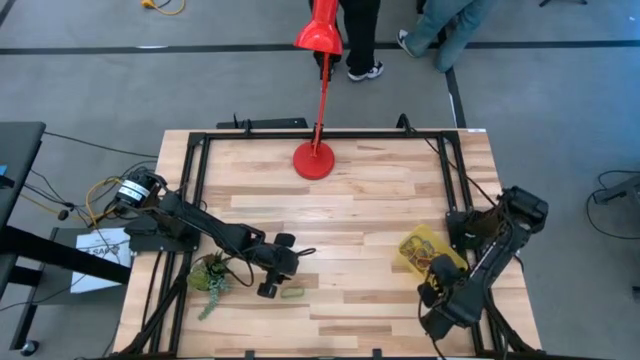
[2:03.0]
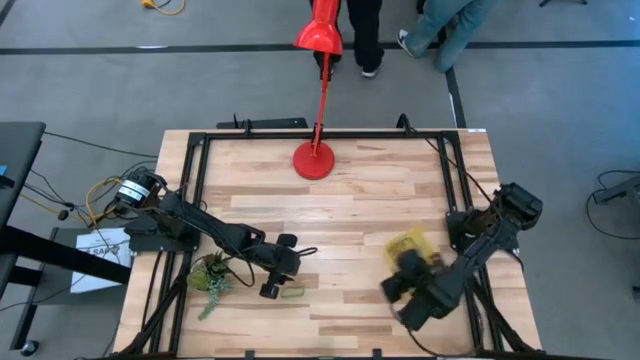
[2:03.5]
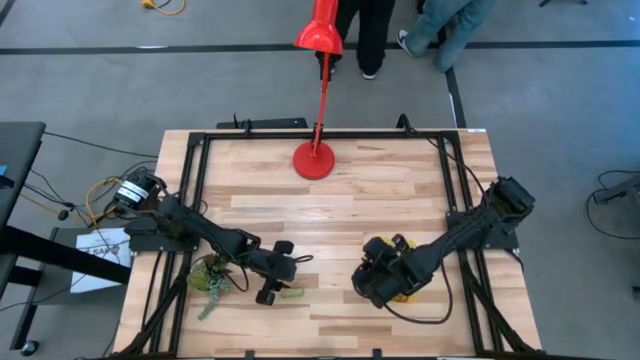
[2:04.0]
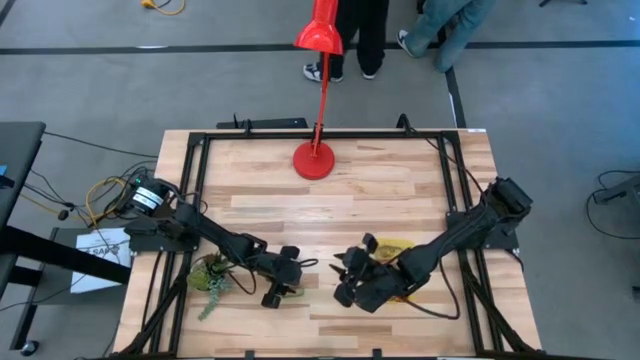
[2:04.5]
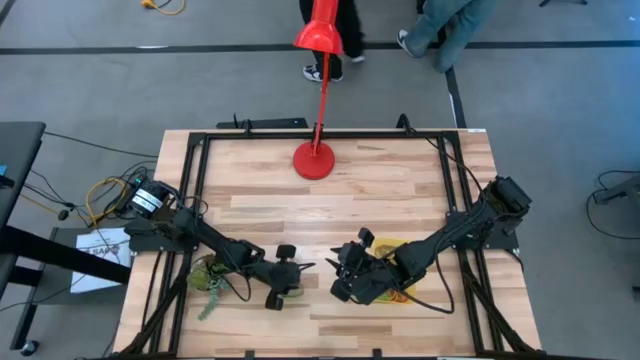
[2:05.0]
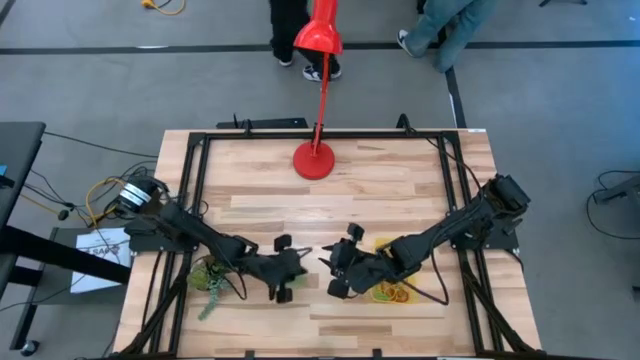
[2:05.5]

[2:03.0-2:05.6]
Task: Pick and place rubber bands into bin
Put the green rubber band into the container

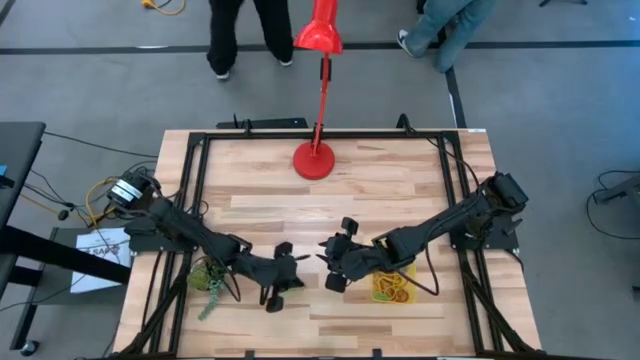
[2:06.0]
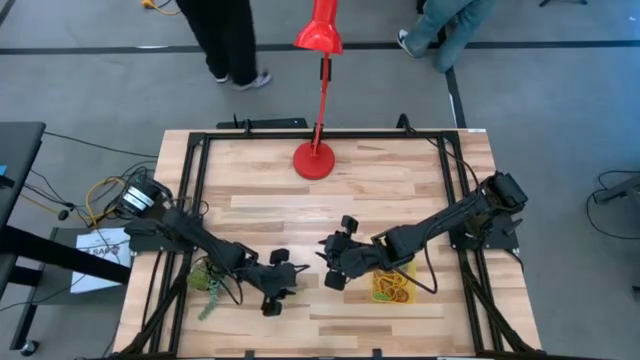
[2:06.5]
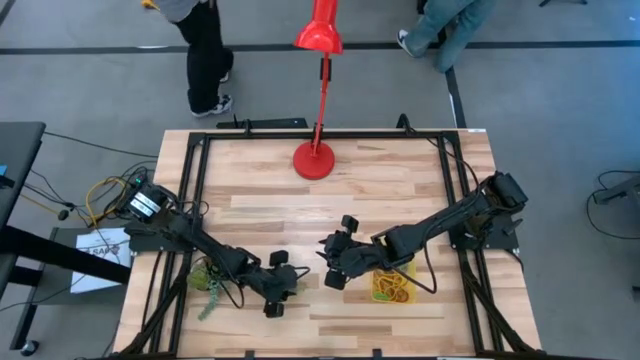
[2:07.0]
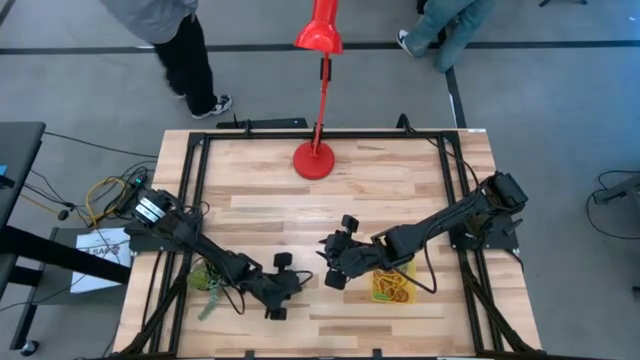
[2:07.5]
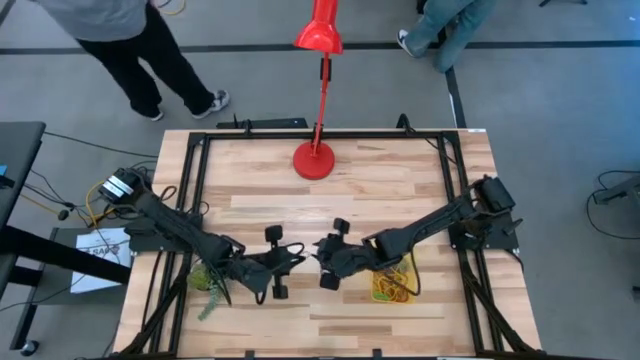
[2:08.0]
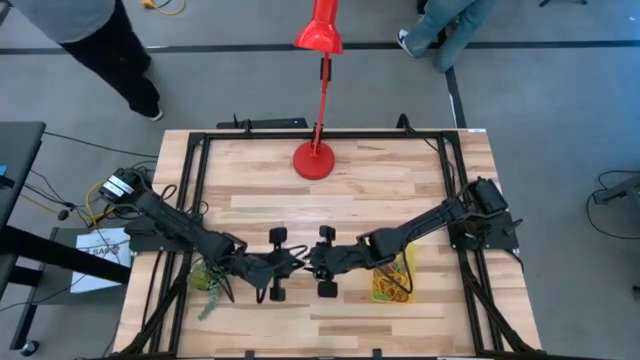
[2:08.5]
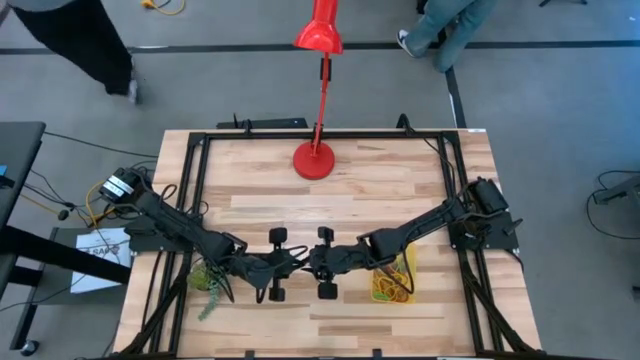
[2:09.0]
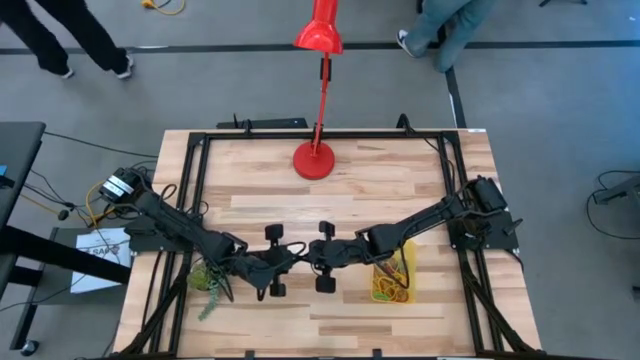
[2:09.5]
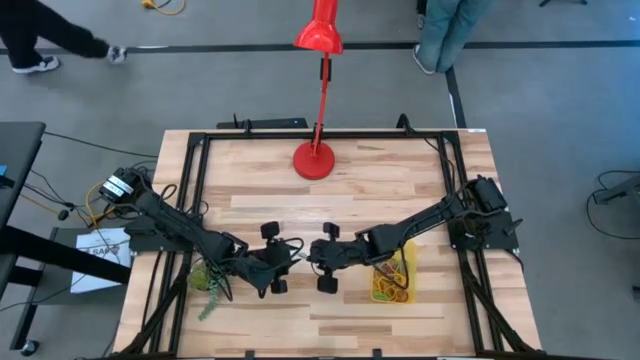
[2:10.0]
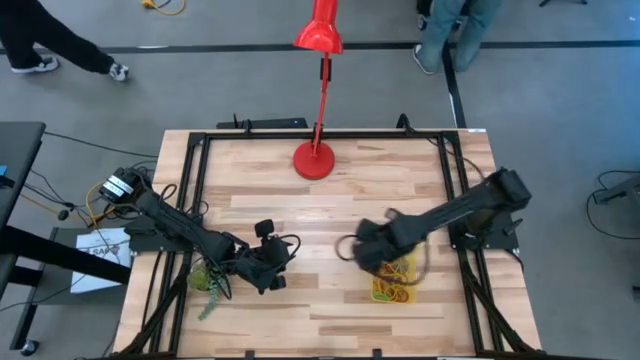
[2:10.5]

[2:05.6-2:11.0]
Put the green rubber band into the container

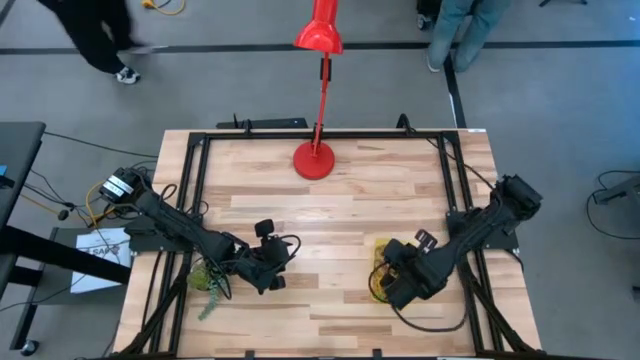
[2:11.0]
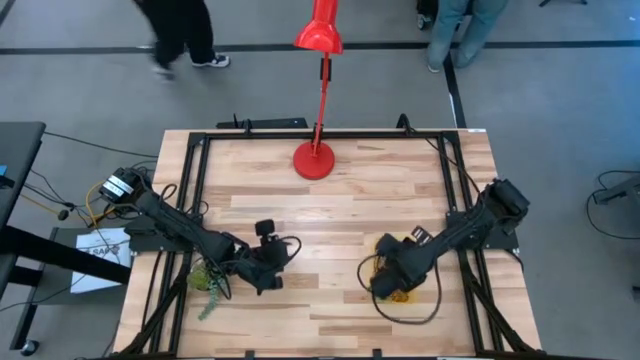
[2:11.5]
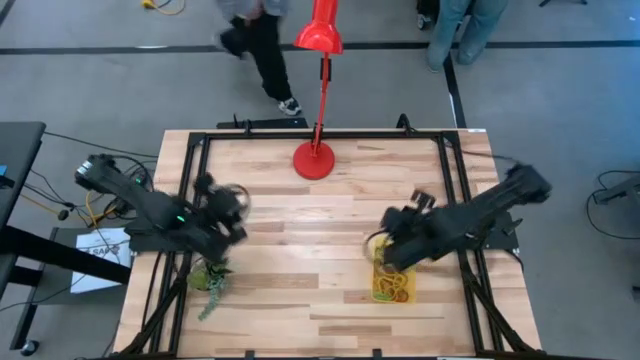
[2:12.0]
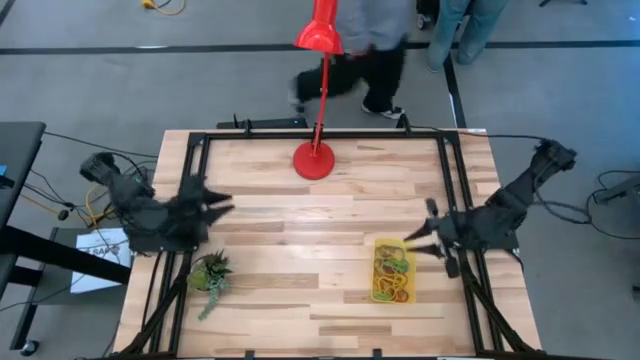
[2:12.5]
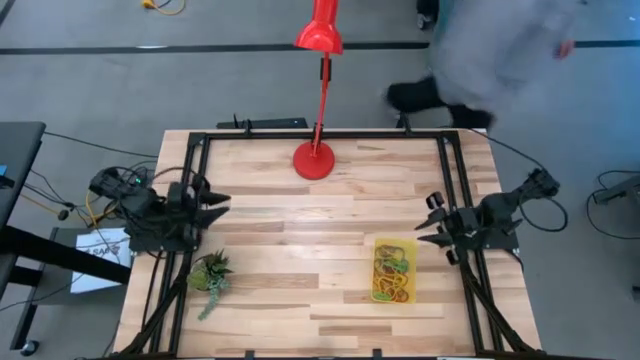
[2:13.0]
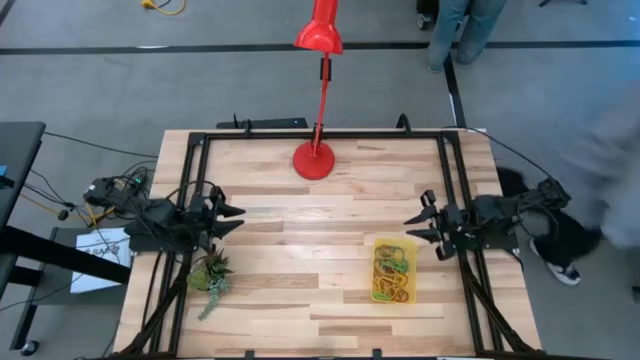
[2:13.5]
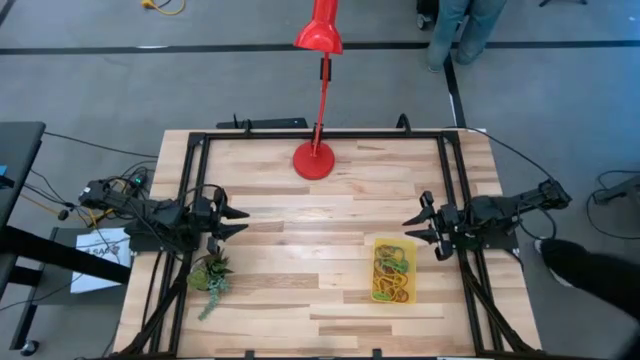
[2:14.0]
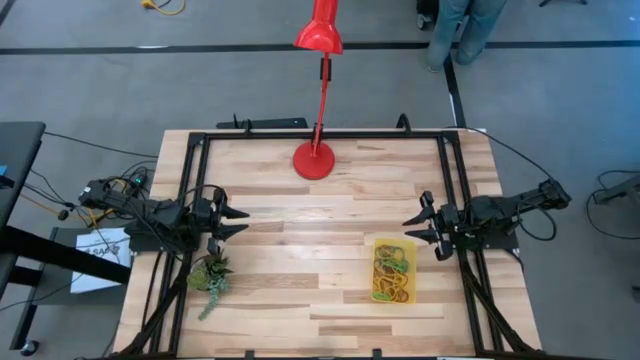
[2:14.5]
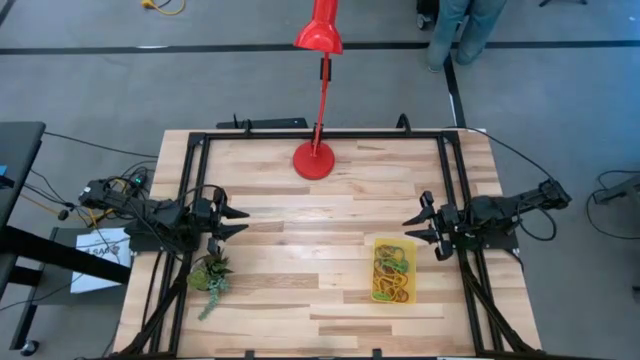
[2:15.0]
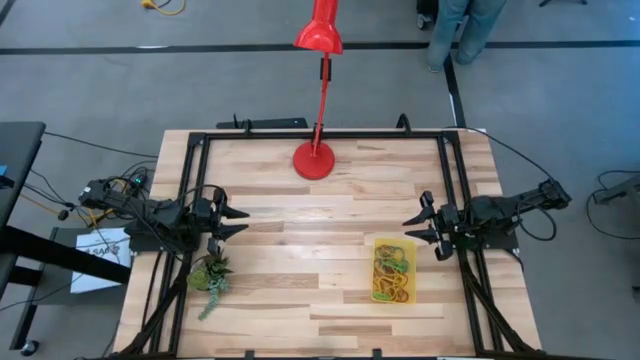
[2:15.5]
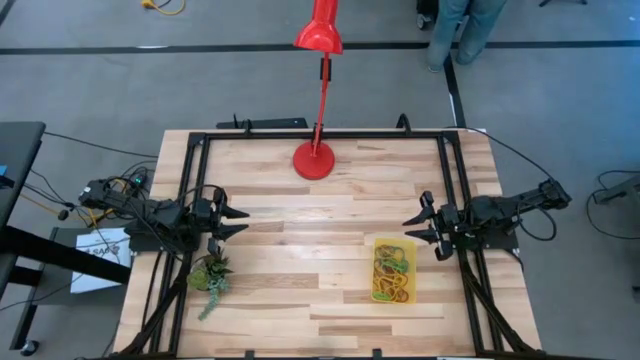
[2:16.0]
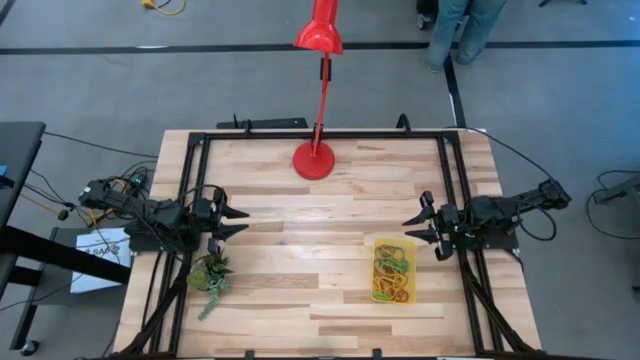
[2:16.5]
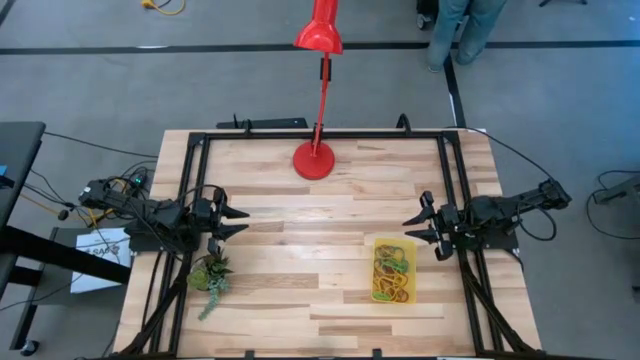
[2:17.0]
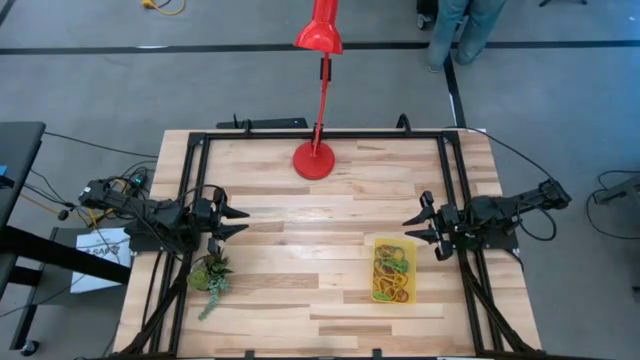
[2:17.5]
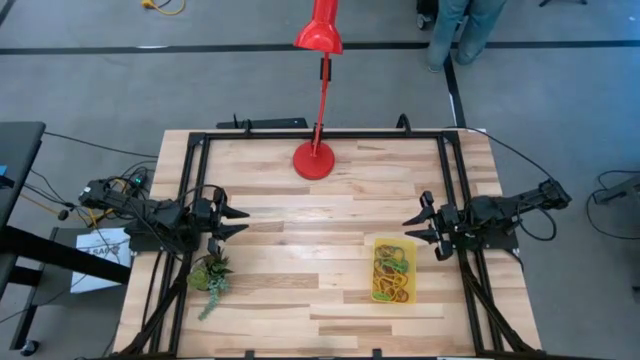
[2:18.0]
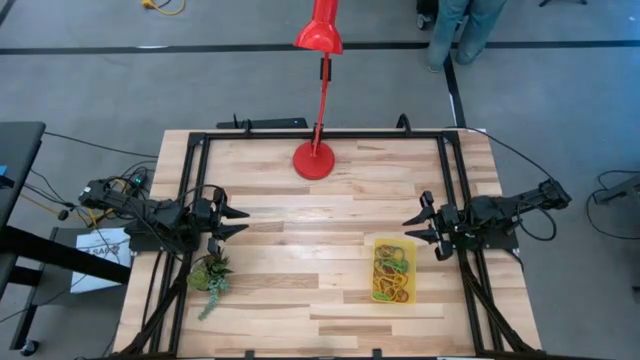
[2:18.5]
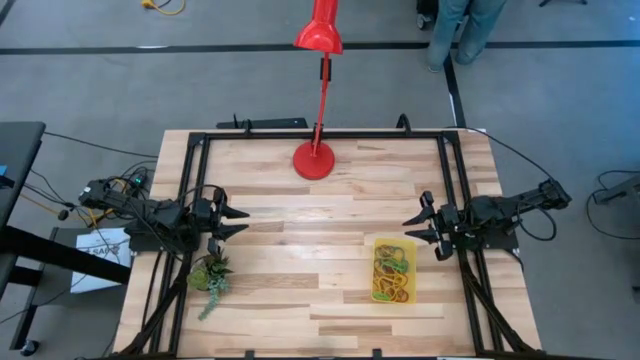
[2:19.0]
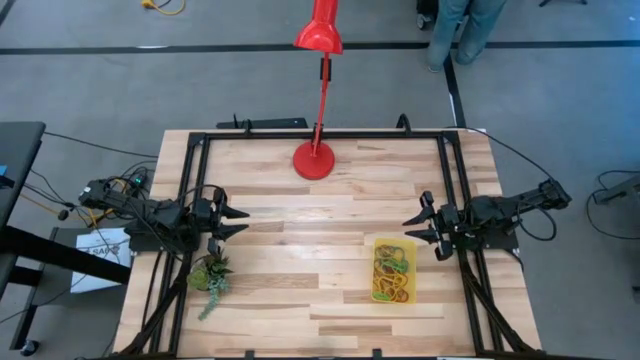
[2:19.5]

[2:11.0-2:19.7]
Return to Home Position

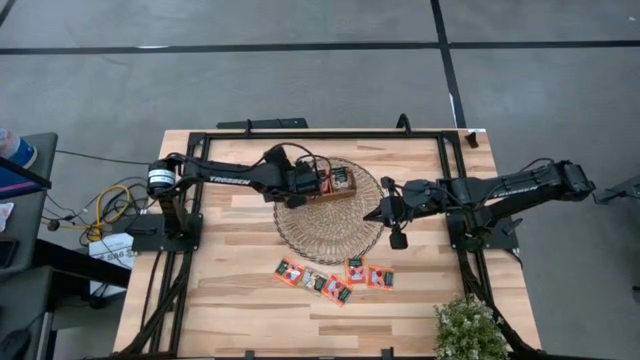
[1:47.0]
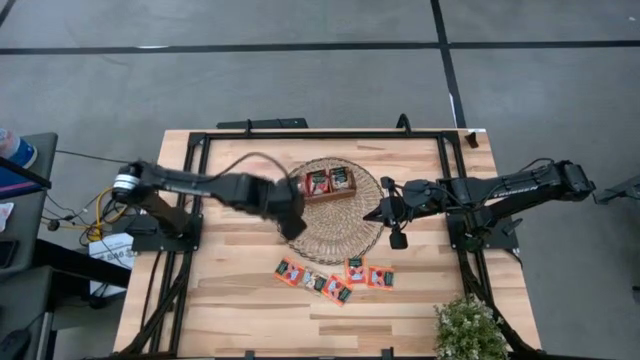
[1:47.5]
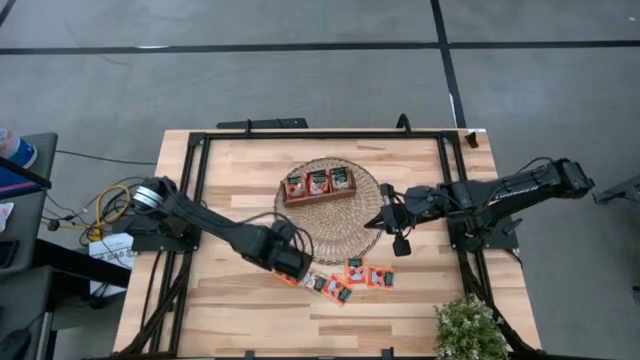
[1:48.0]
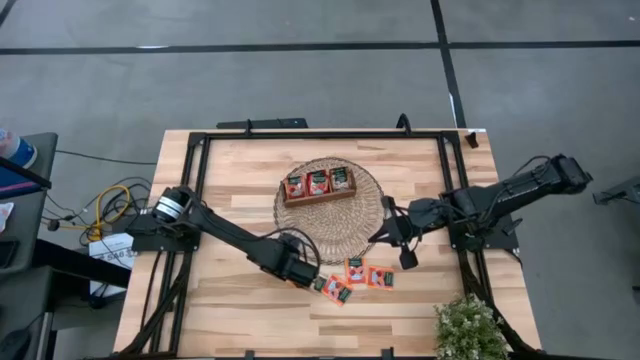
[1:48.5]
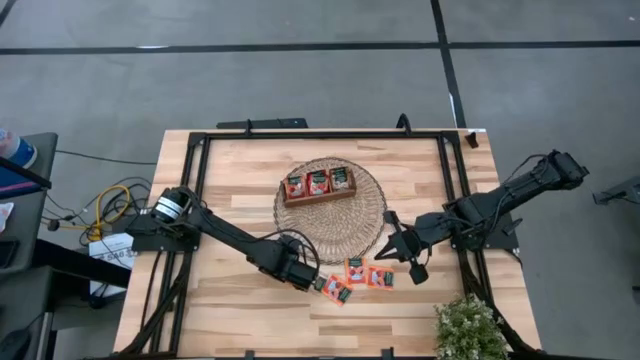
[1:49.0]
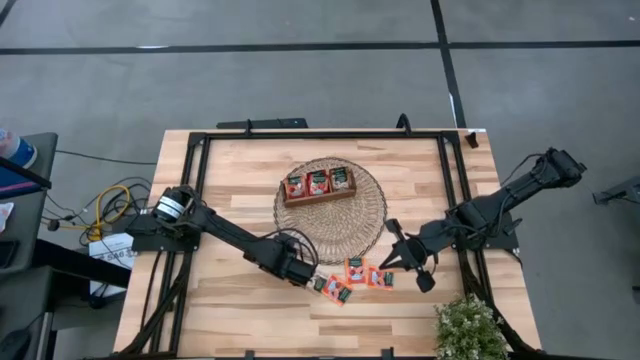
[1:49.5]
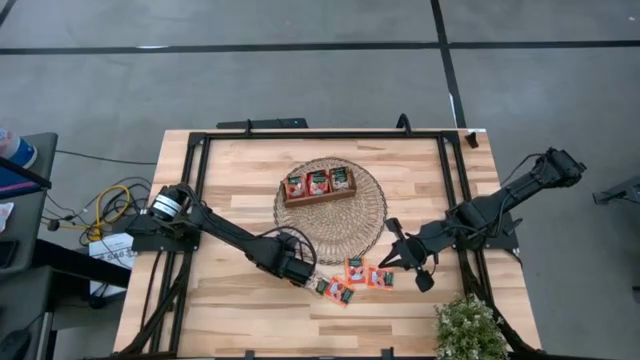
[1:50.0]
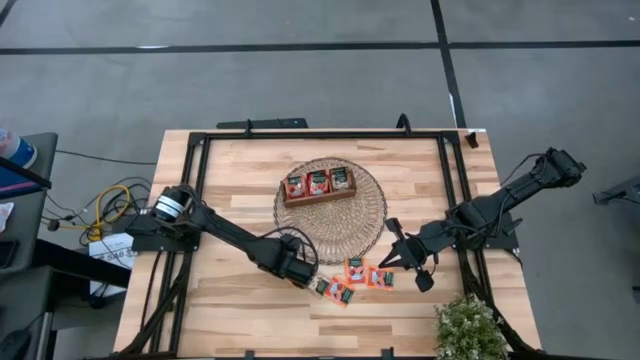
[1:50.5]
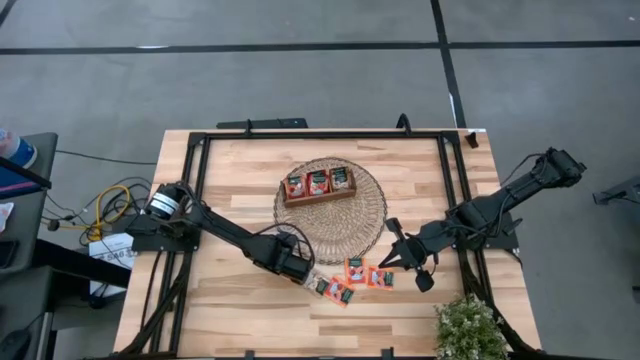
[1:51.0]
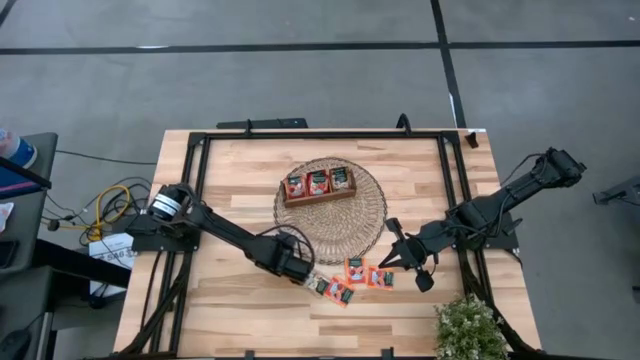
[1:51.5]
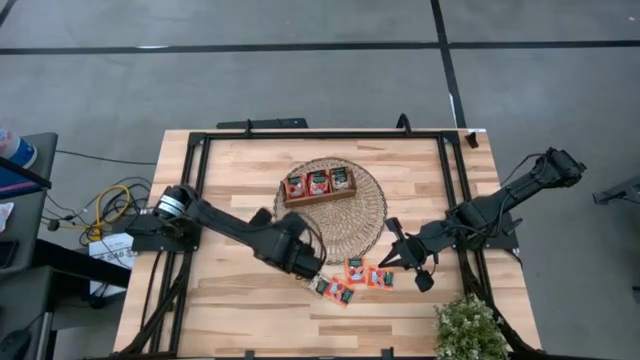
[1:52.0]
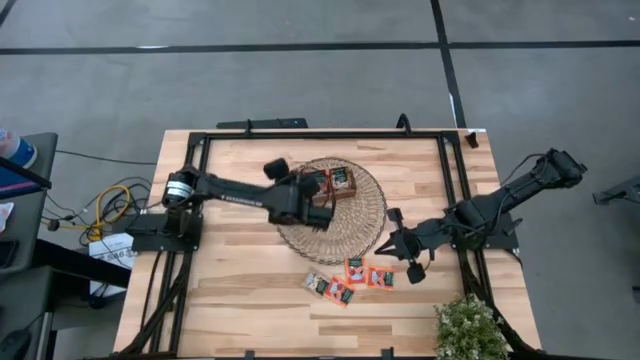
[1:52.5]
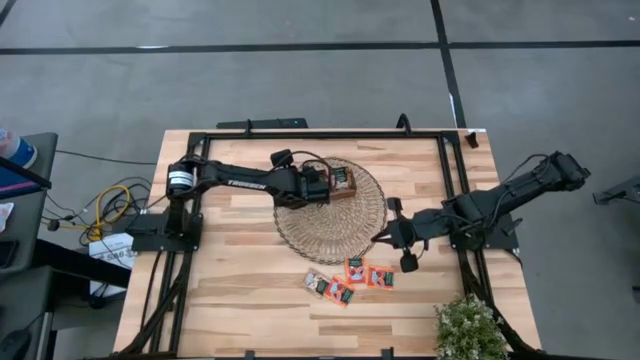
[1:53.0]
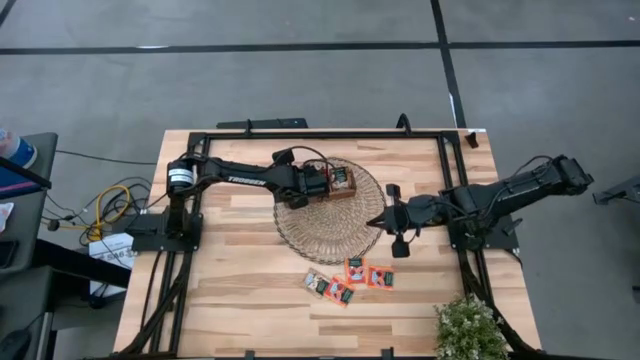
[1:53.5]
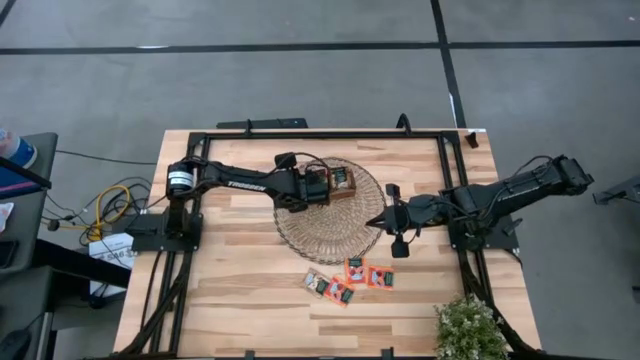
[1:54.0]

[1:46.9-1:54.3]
Task: Pick & Place Tea
Put the orange tea bag into the left side of the wooden organizer
